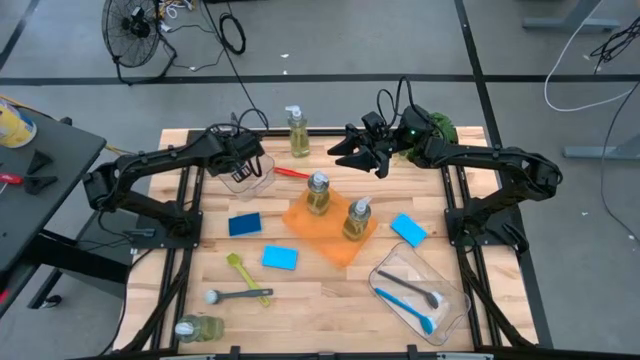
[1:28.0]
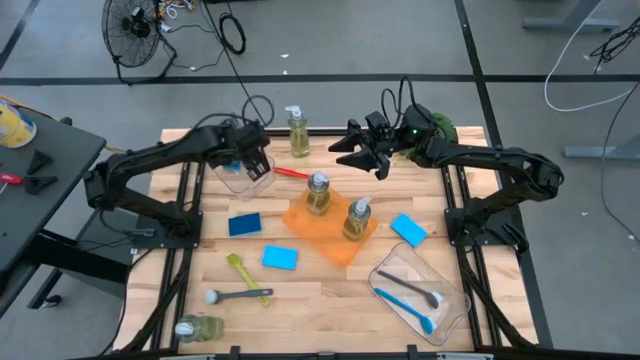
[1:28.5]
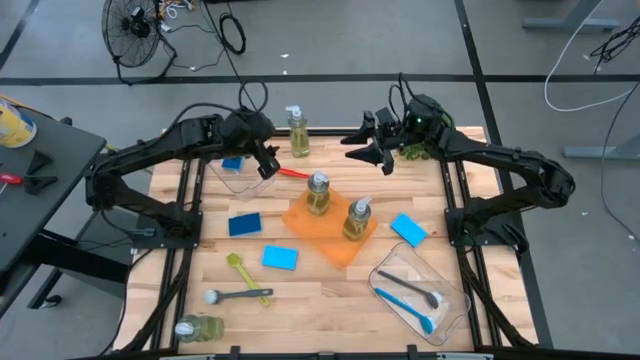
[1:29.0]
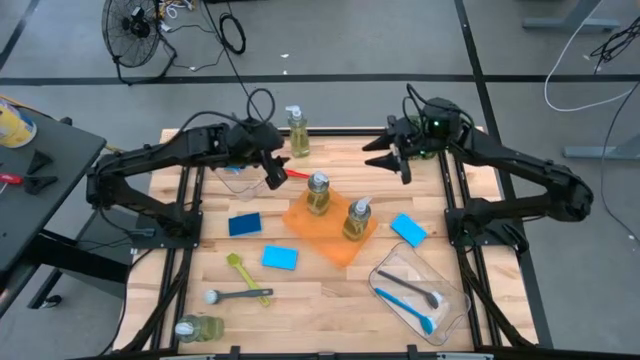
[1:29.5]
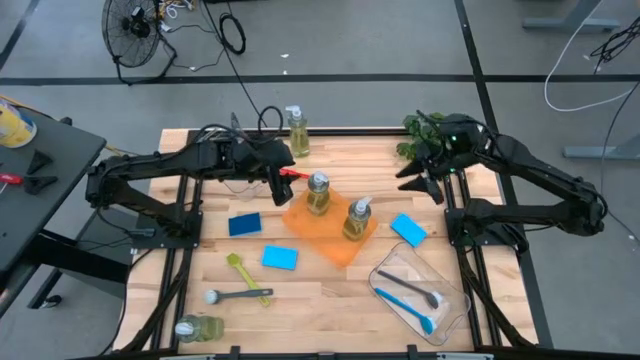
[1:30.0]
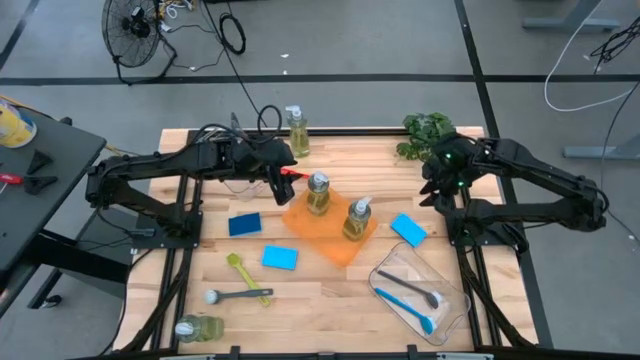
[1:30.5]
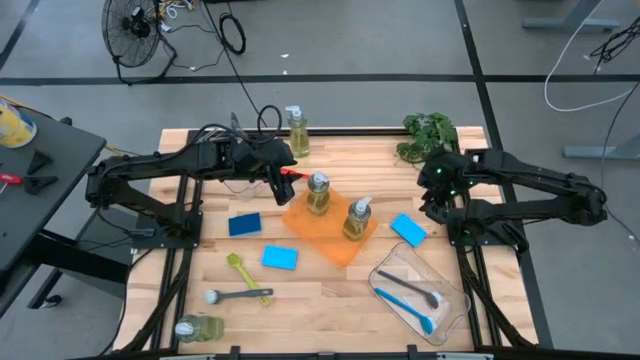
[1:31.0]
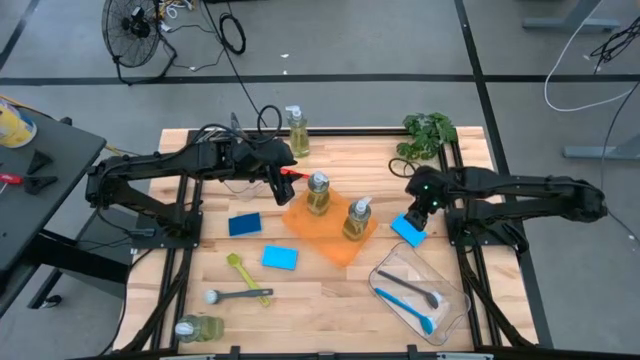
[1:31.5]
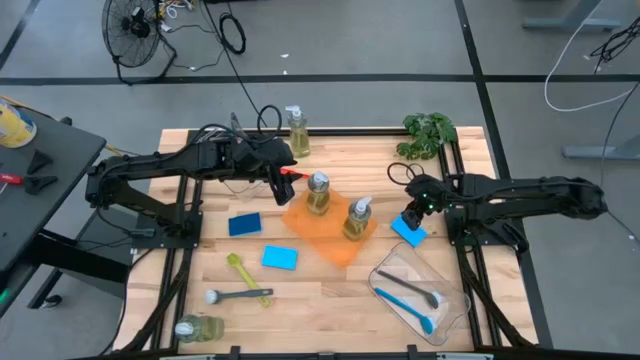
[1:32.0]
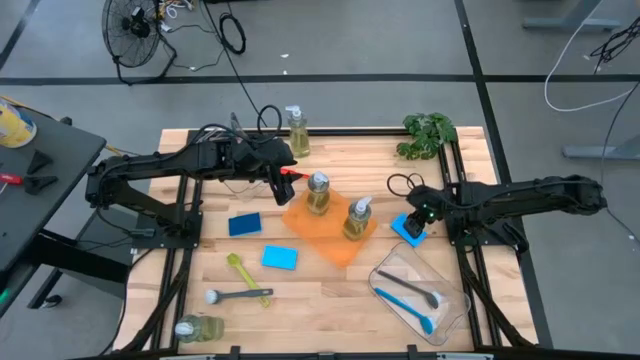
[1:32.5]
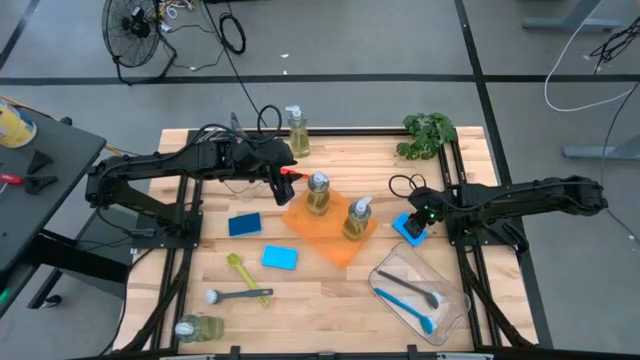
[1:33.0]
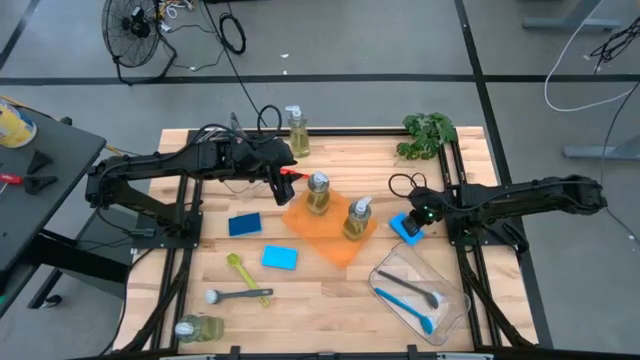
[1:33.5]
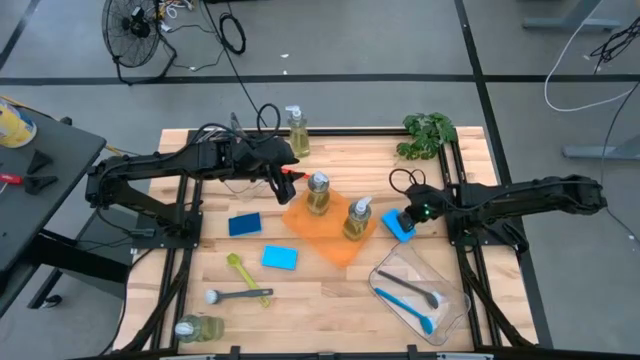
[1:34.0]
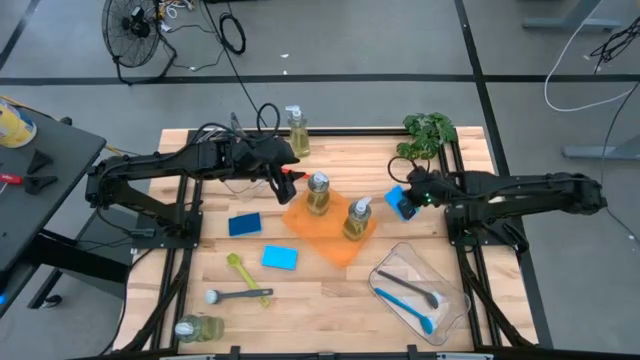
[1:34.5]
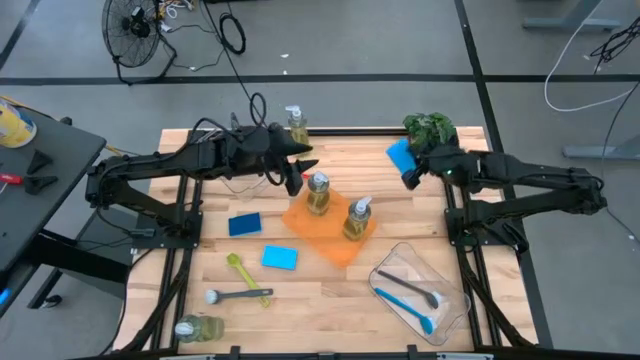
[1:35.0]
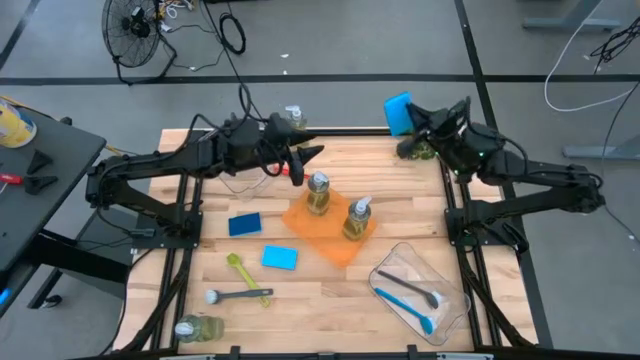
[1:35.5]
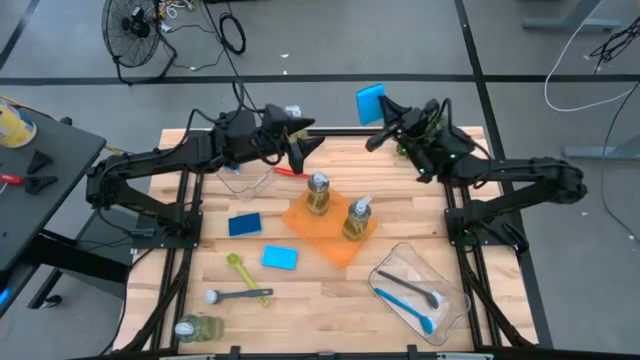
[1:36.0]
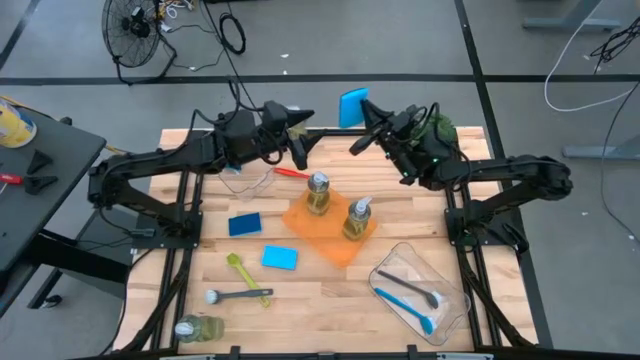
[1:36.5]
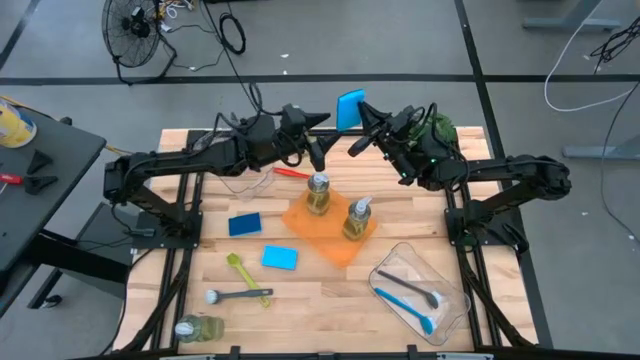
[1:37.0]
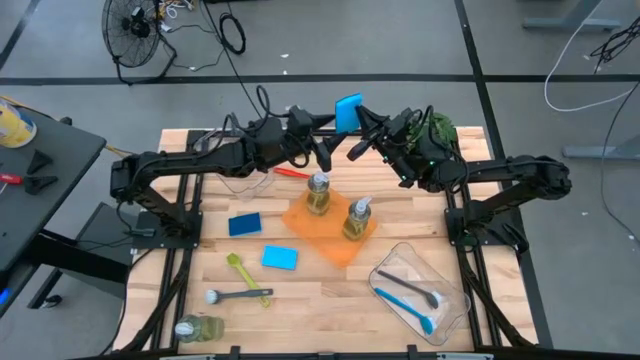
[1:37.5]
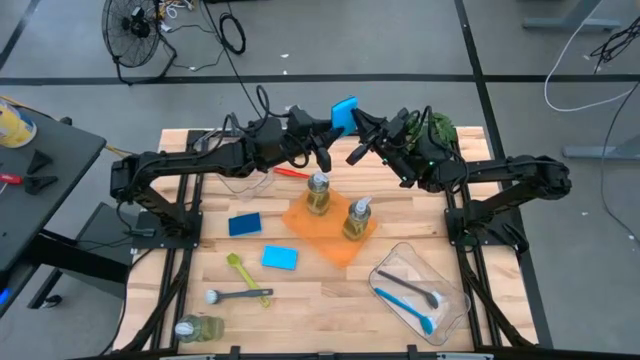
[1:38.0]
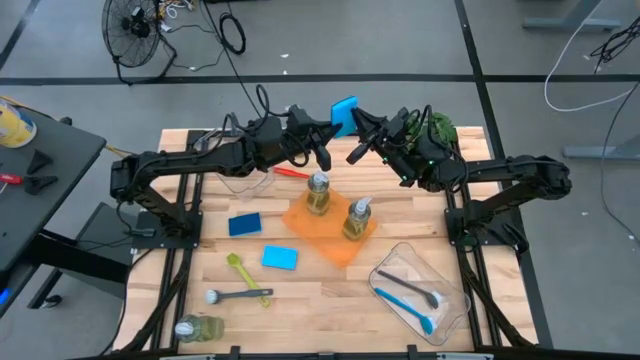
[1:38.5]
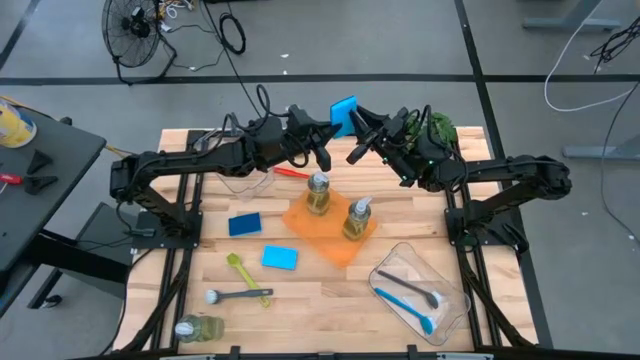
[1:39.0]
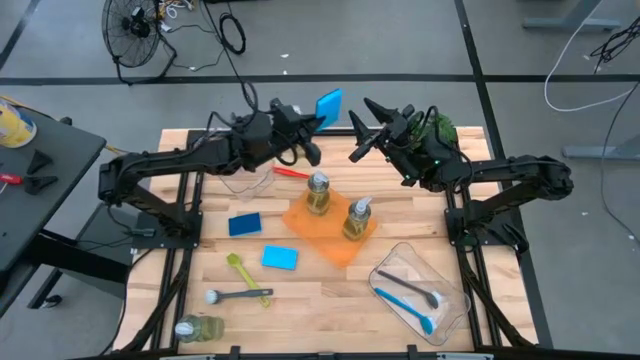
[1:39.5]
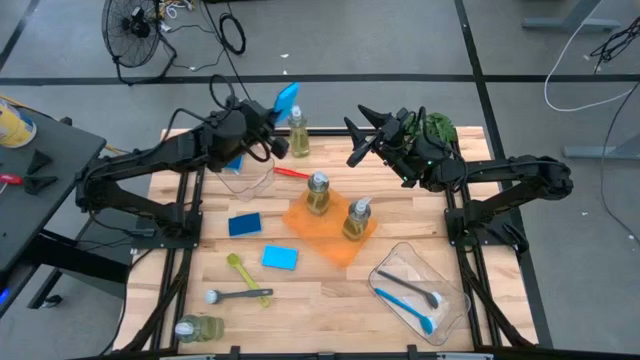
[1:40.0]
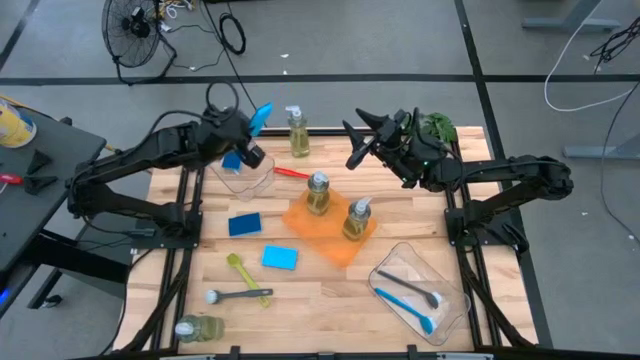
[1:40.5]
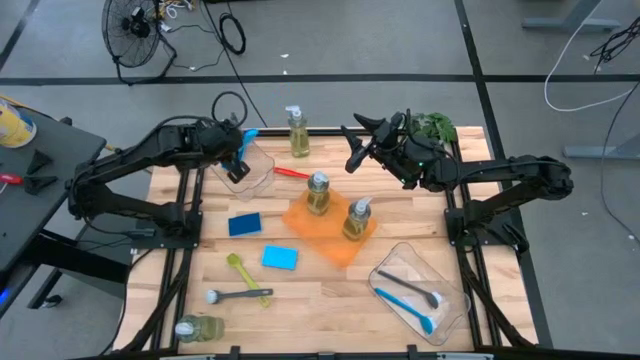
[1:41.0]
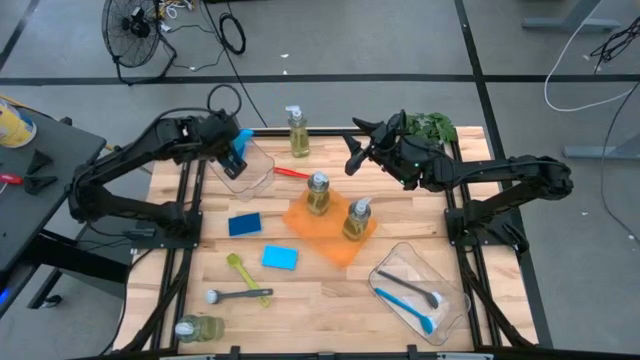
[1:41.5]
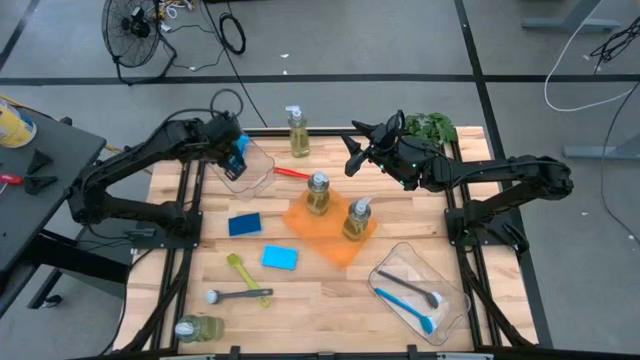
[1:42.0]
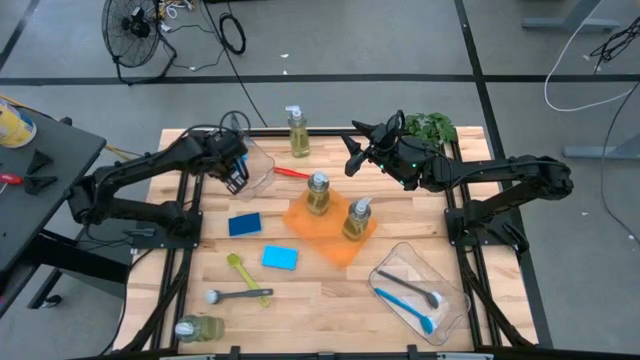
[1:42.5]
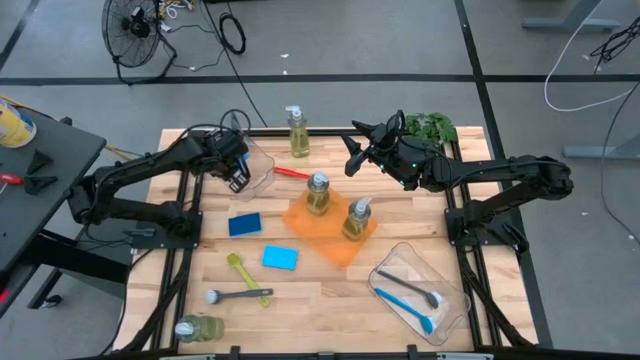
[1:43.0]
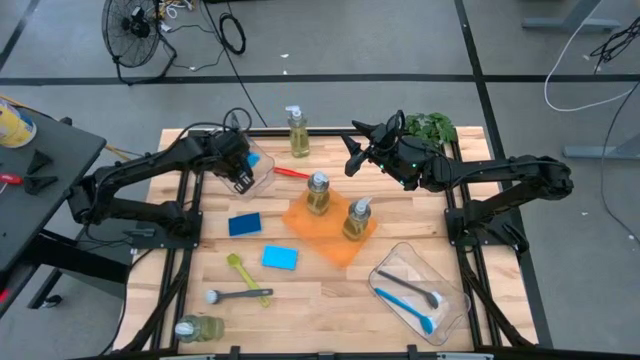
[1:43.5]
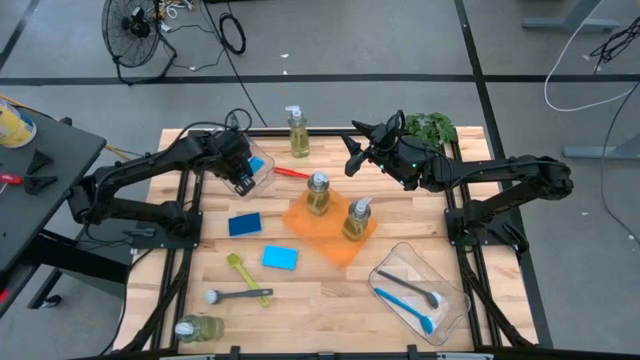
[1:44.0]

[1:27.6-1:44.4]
Task: Pick & Place Kitchen Sink Supplies
Put the blue sponge into the top transparent bin

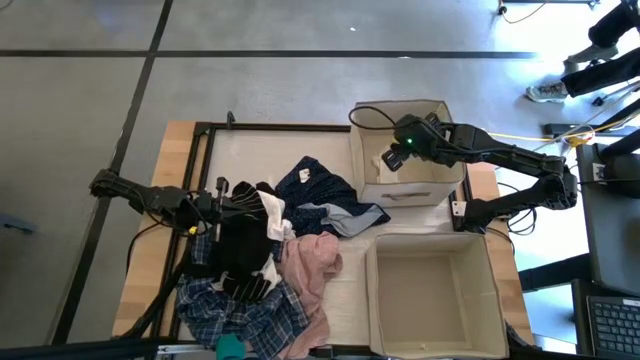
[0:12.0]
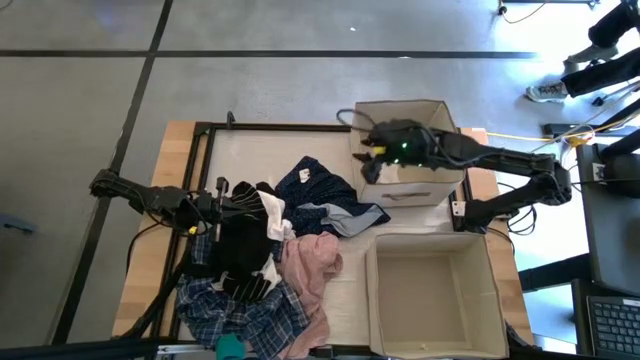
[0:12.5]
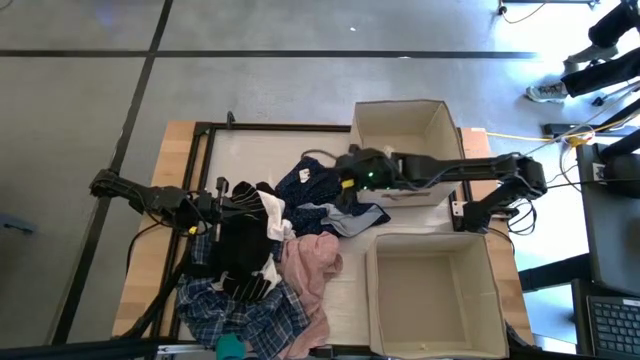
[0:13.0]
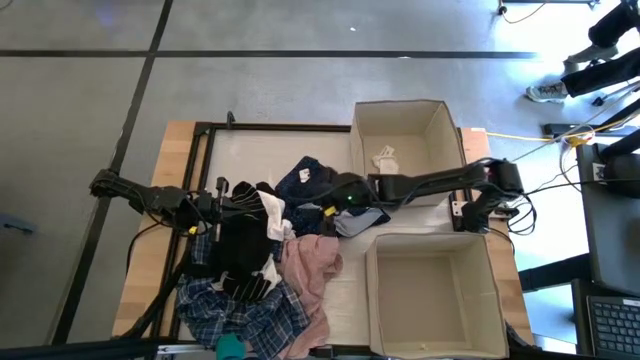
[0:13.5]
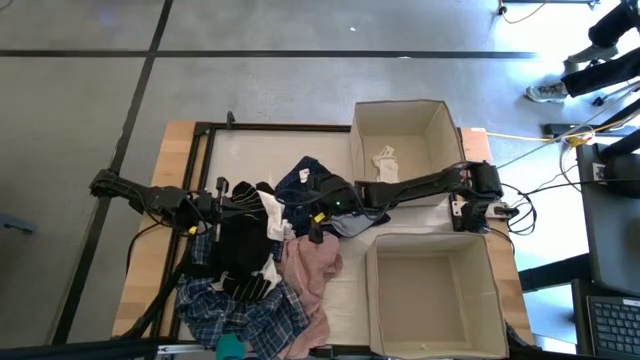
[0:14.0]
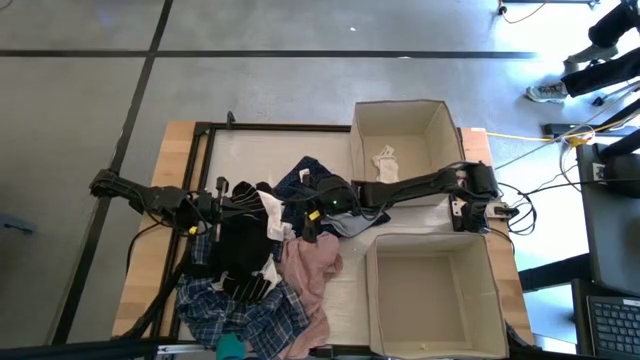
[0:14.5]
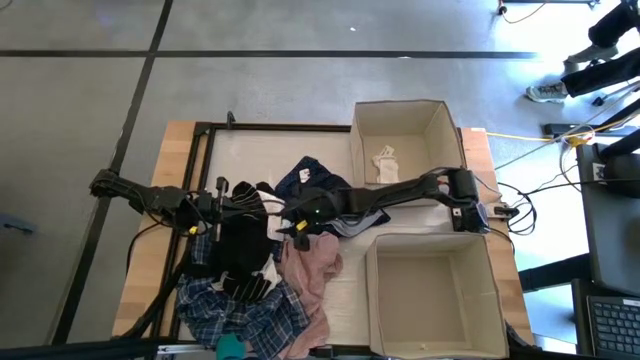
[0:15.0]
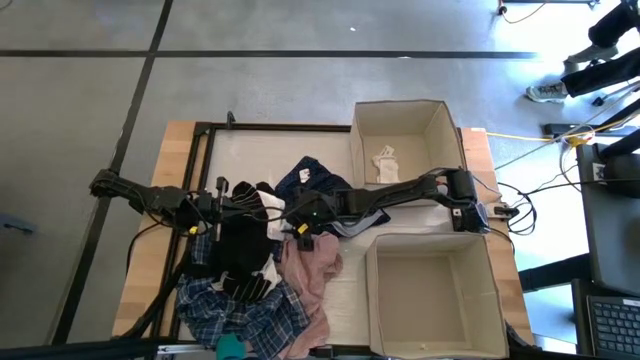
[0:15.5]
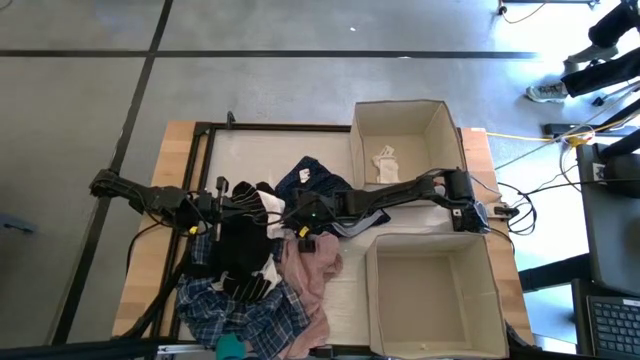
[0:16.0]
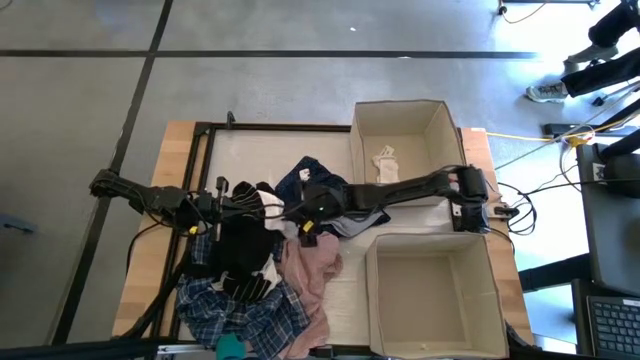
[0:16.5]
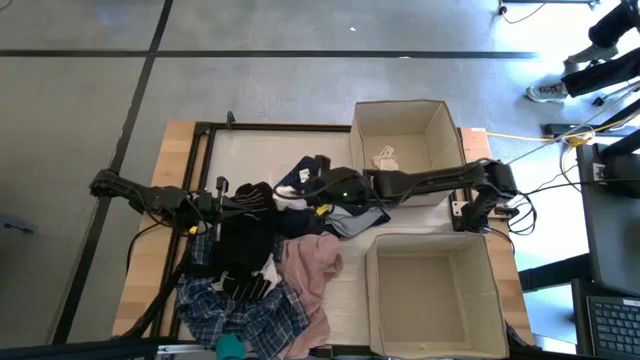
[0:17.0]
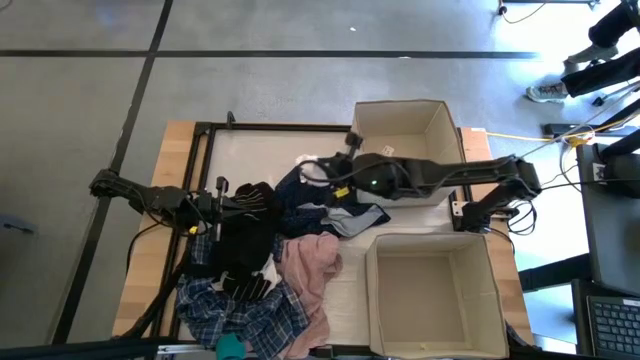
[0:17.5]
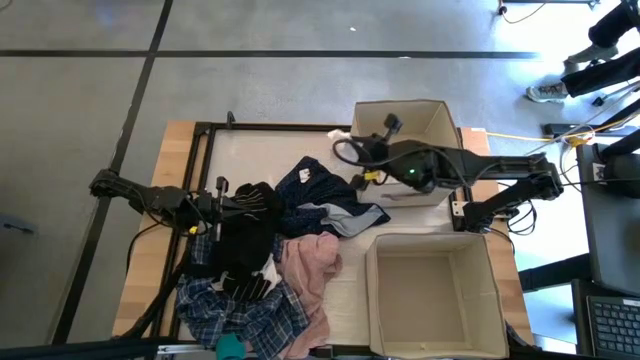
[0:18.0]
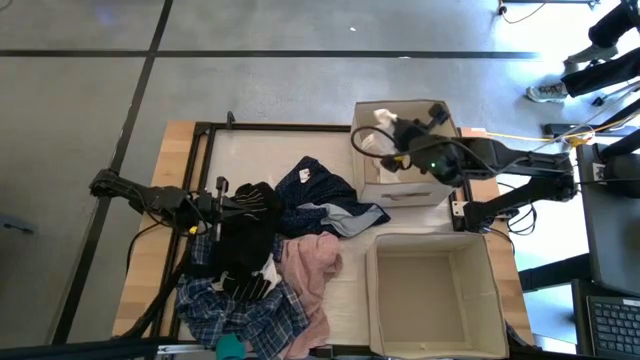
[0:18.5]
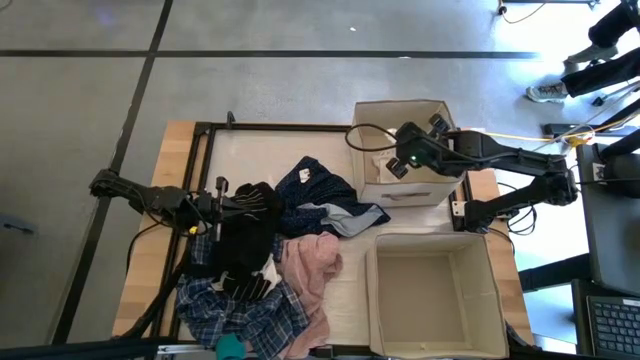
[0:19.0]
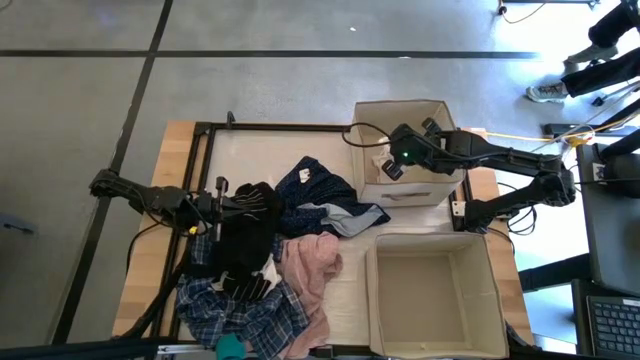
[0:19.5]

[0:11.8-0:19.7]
Task: Sort clothes
Put the white sock into the laundry organizer
